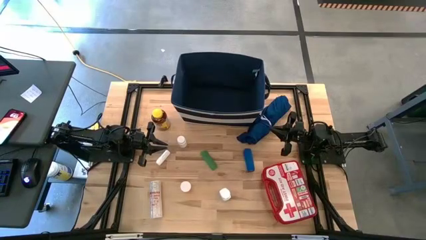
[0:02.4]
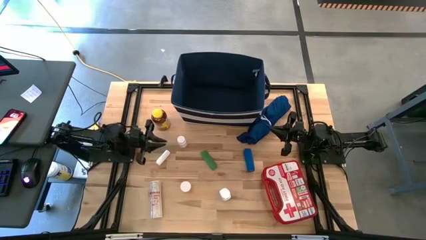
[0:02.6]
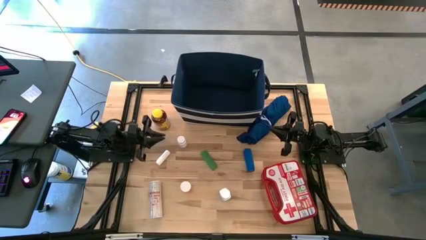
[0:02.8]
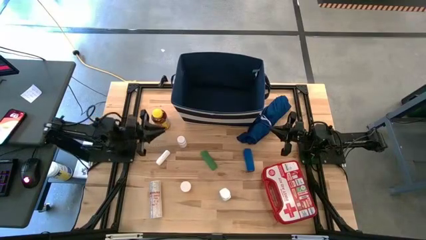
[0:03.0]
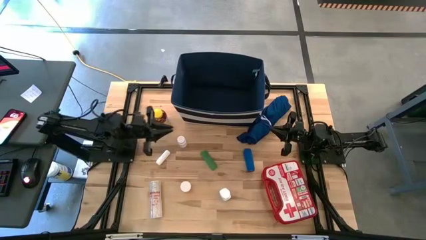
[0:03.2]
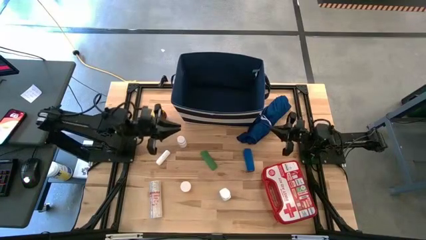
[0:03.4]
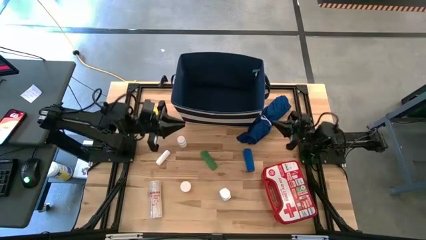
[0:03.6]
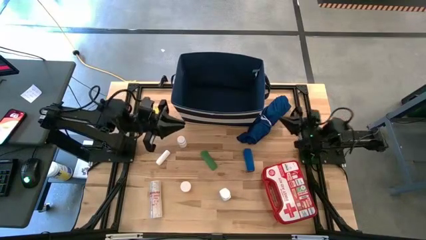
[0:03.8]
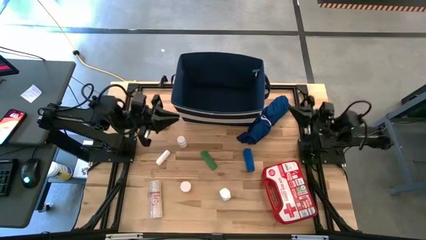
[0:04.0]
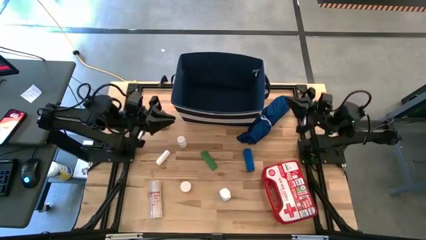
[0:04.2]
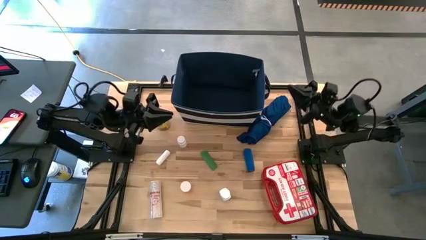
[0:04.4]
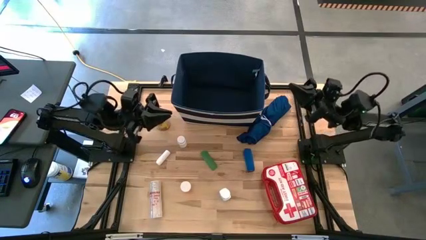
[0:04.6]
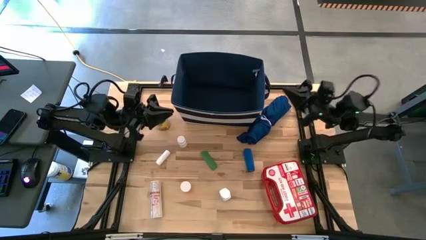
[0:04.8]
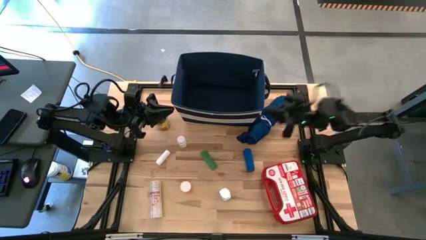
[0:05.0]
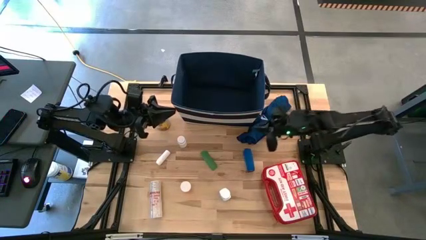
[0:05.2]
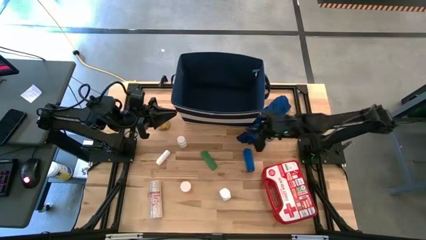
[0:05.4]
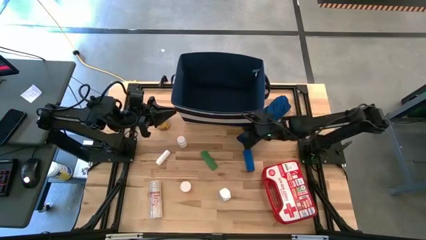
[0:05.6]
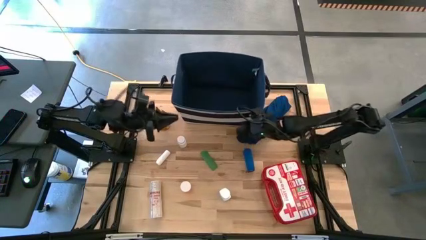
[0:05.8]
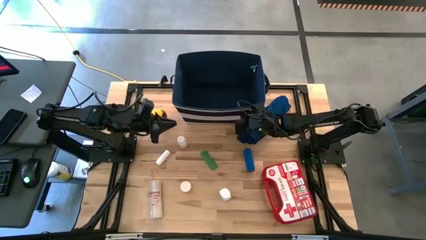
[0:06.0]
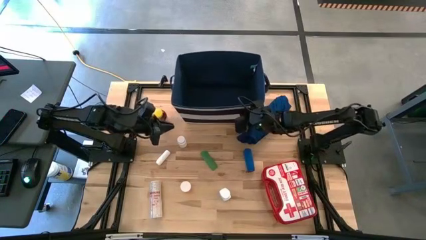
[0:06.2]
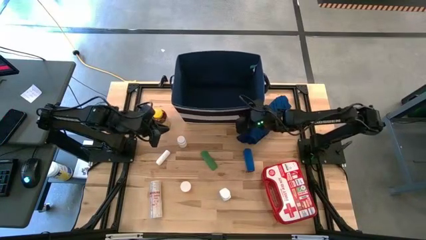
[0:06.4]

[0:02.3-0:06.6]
Task: Pick & place medical supplies in basket/bin
Adjust the blue bin

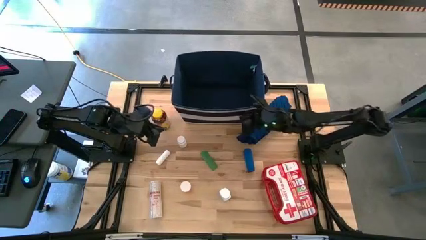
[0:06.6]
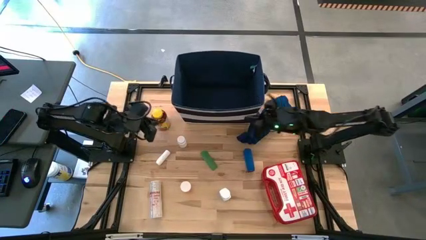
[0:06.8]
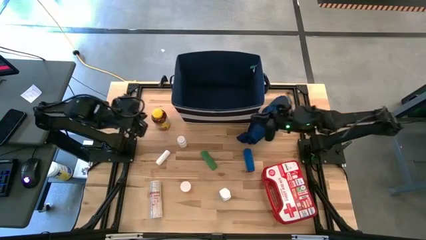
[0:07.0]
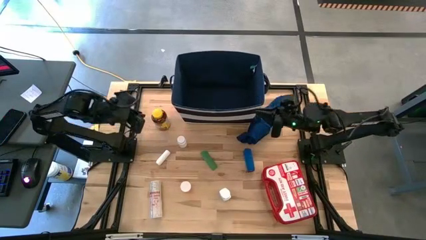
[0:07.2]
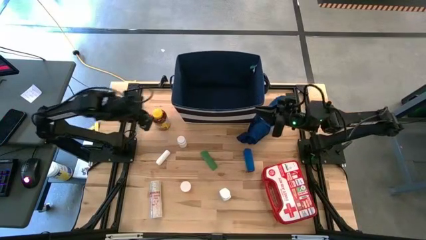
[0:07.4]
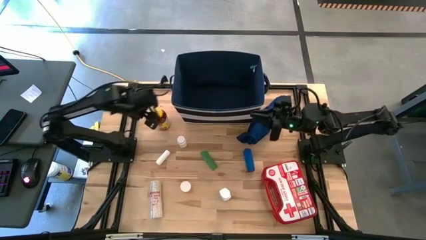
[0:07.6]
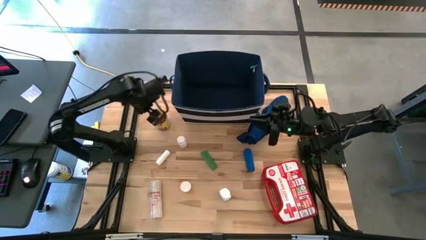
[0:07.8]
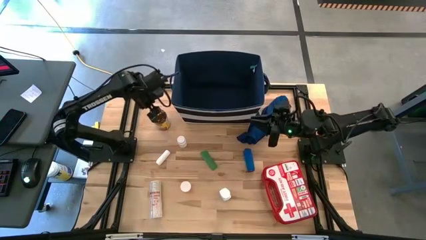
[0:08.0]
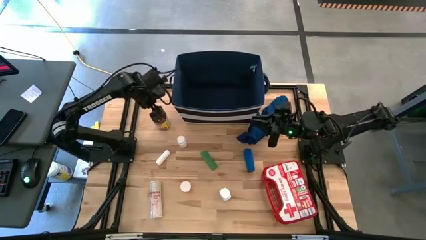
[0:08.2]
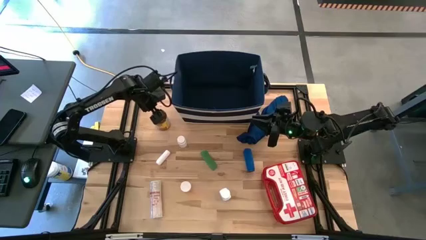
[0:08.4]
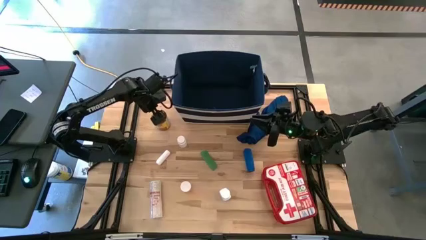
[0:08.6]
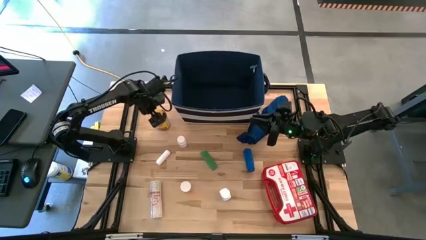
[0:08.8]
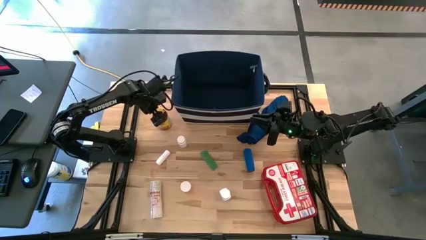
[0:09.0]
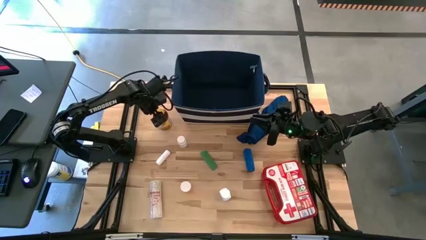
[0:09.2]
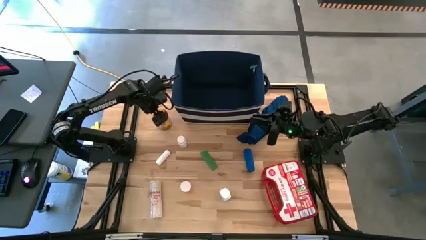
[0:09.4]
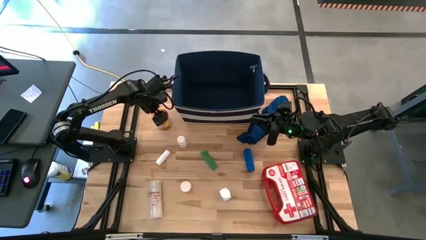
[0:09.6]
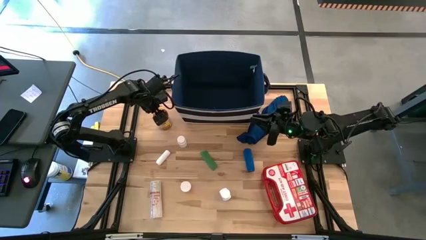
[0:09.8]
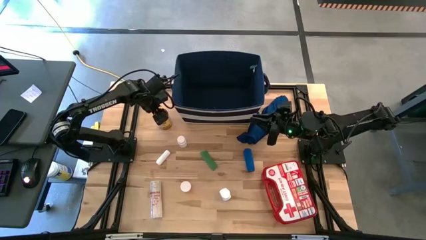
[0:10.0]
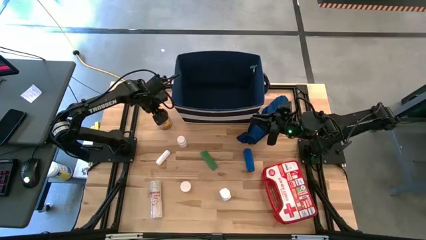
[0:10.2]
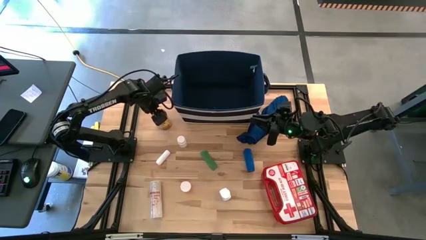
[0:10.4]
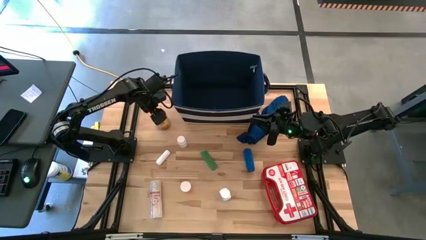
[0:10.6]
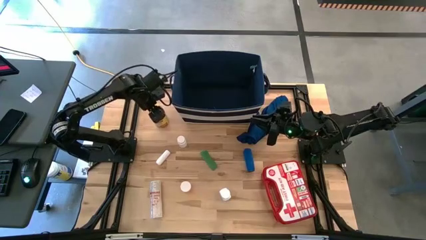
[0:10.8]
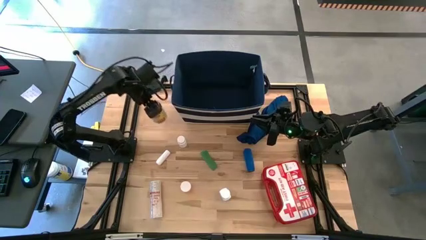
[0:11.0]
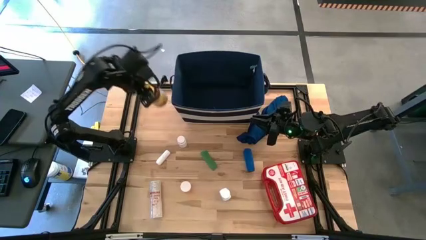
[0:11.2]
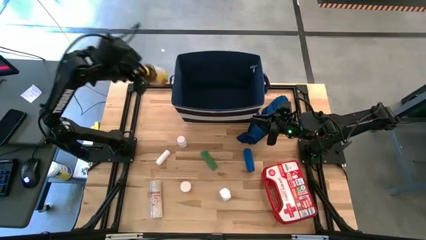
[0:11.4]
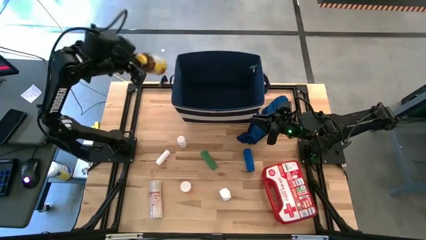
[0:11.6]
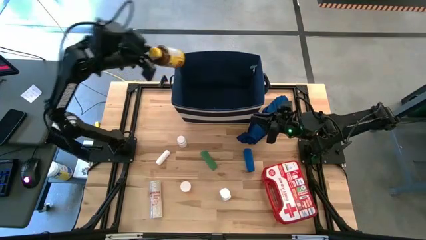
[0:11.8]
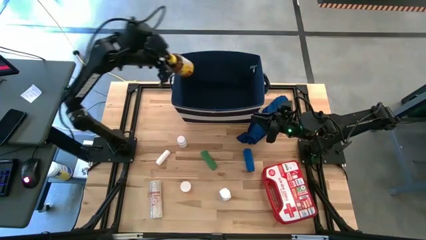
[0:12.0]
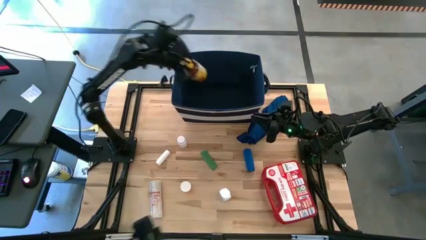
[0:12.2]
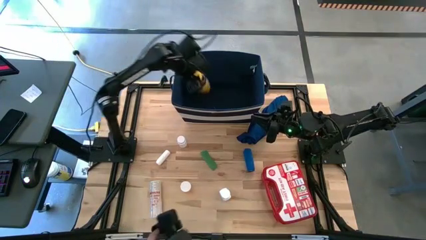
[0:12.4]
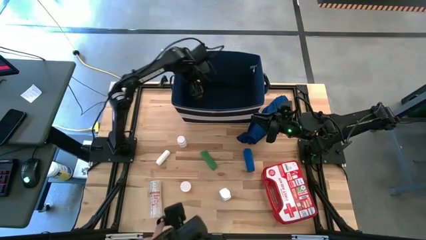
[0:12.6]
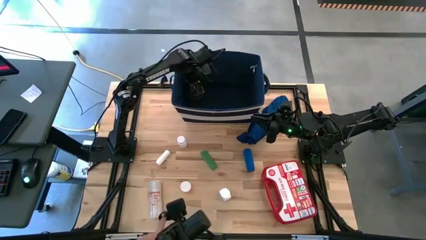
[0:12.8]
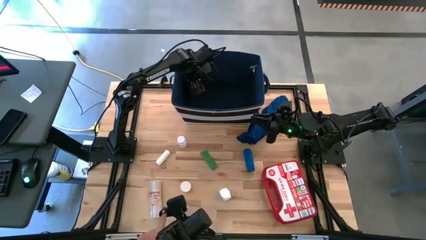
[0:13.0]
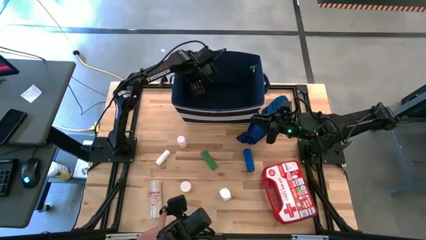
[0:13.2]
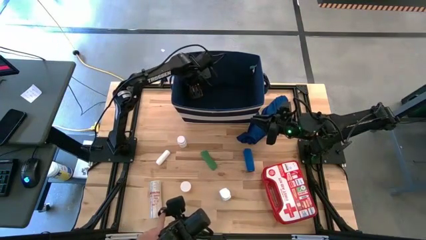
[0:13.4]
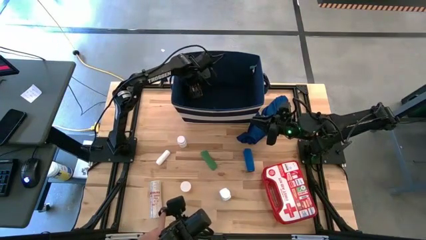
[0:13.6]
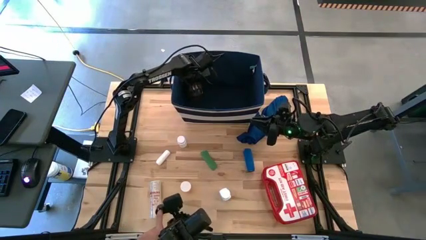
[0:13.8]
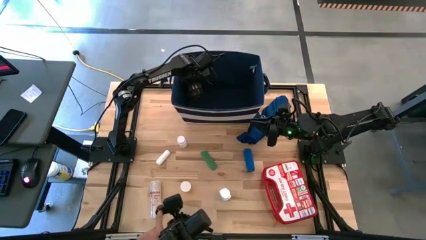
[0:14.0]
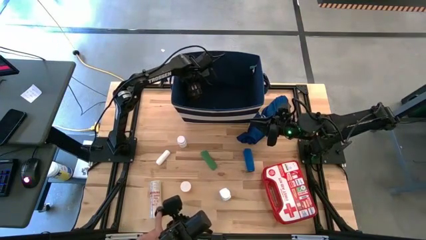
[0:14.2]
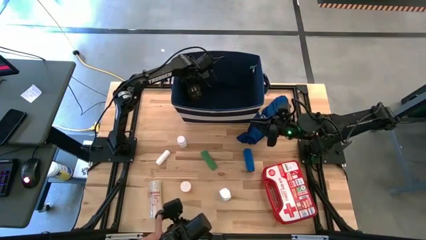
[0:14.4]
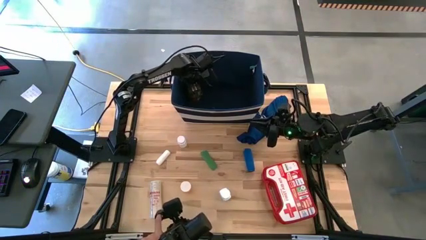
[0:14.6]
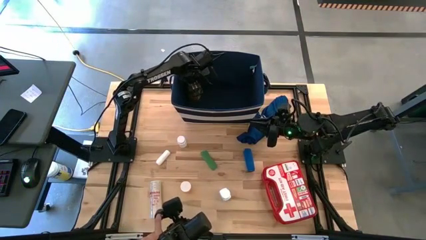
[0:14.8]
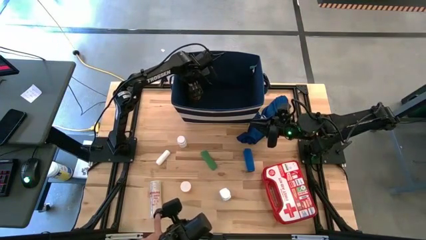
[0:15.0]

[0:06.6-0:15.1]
Put the yellow medicine bottle into the blue bin

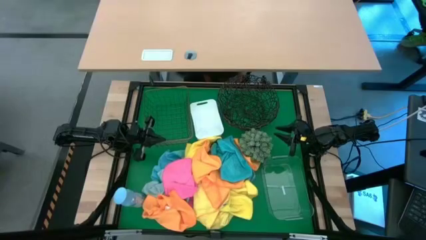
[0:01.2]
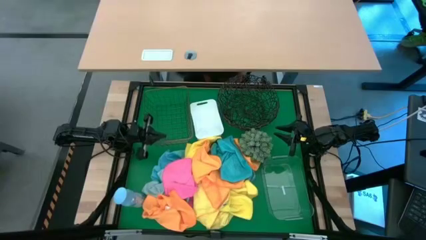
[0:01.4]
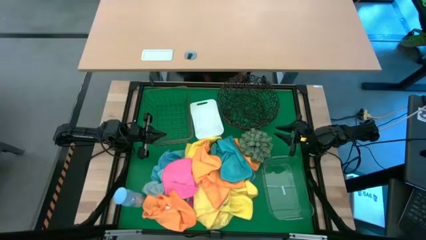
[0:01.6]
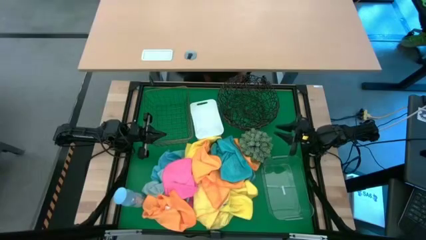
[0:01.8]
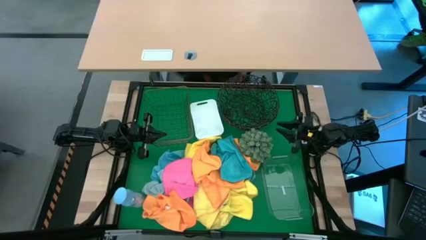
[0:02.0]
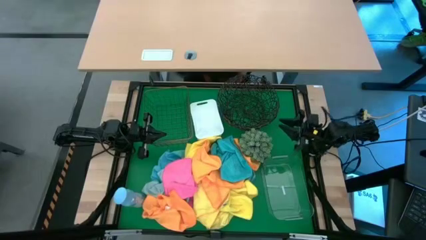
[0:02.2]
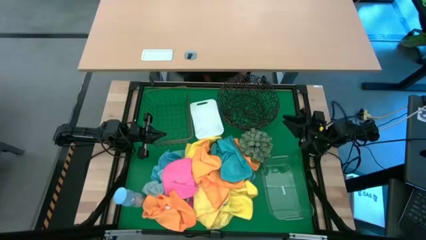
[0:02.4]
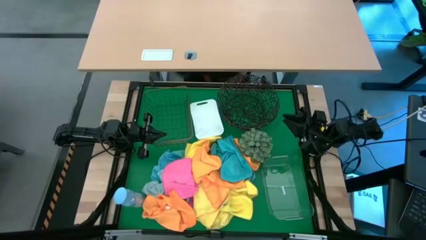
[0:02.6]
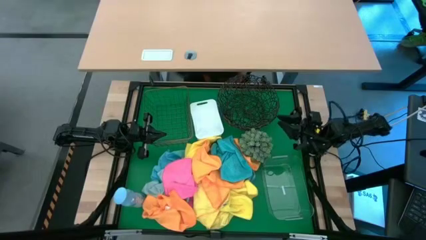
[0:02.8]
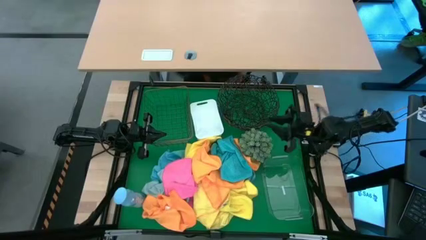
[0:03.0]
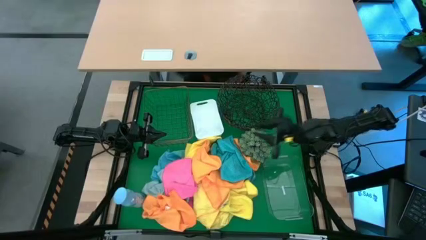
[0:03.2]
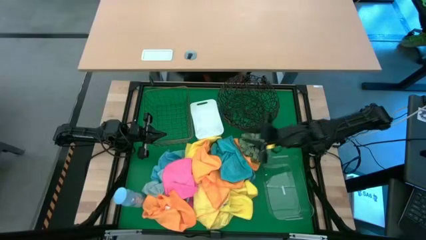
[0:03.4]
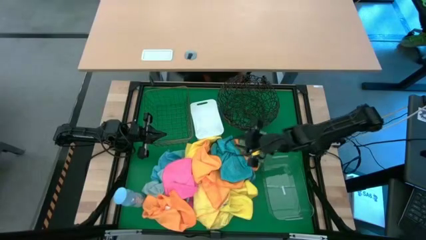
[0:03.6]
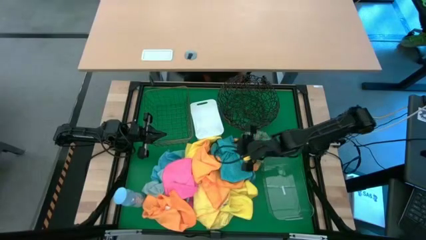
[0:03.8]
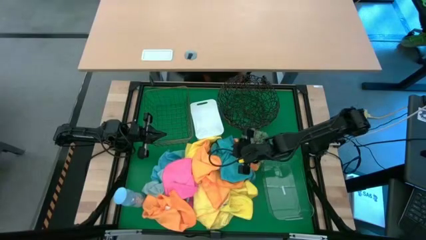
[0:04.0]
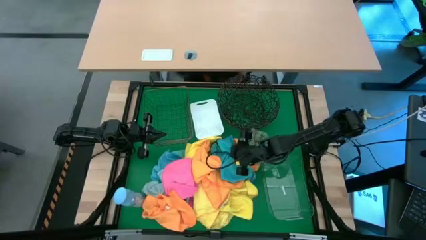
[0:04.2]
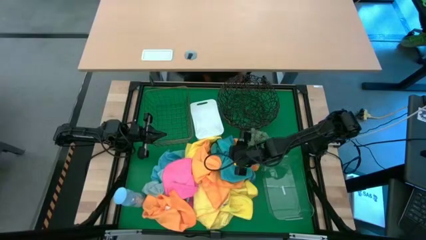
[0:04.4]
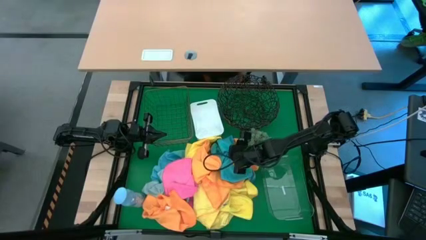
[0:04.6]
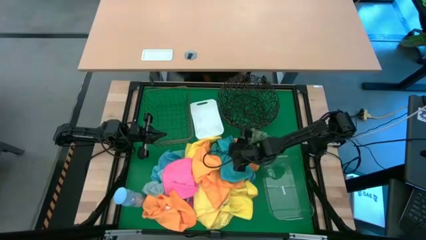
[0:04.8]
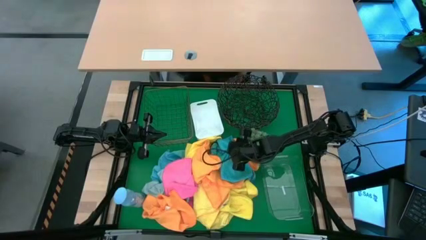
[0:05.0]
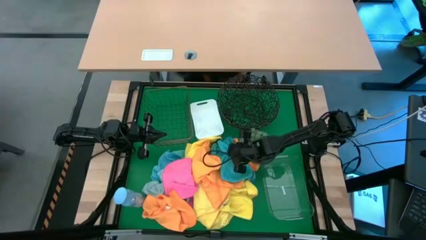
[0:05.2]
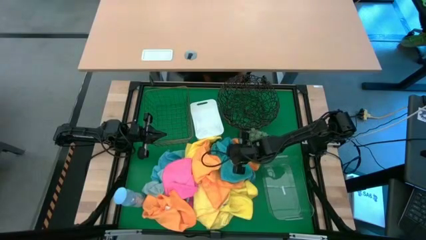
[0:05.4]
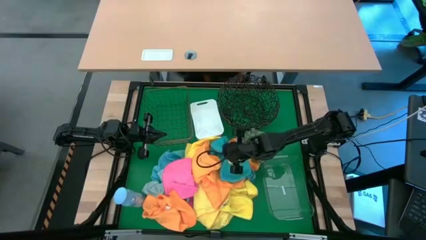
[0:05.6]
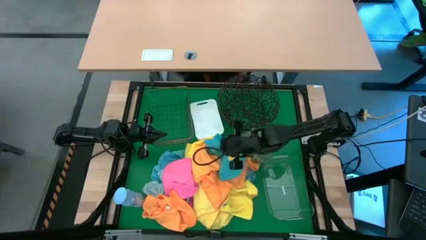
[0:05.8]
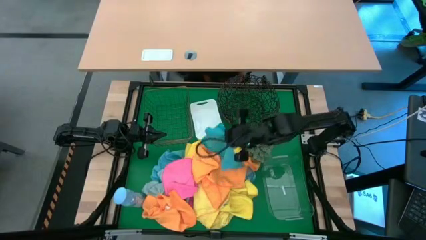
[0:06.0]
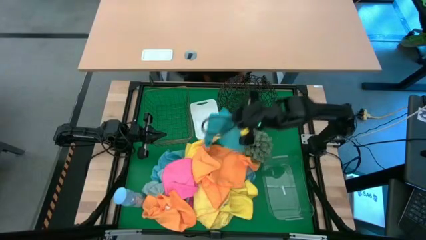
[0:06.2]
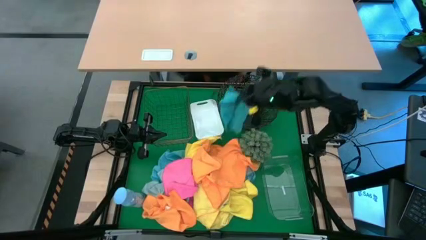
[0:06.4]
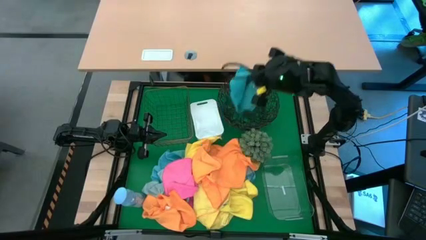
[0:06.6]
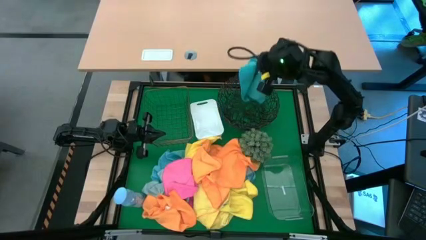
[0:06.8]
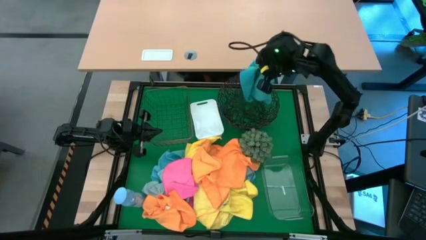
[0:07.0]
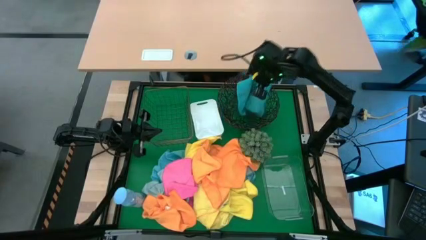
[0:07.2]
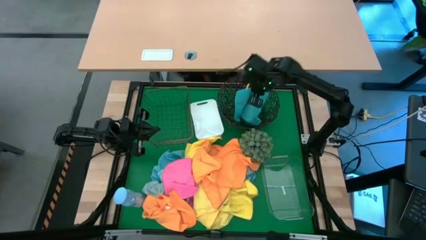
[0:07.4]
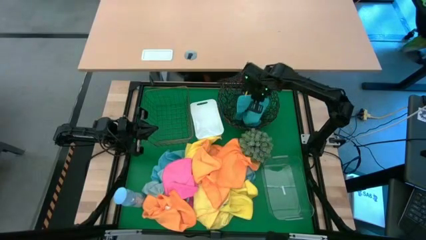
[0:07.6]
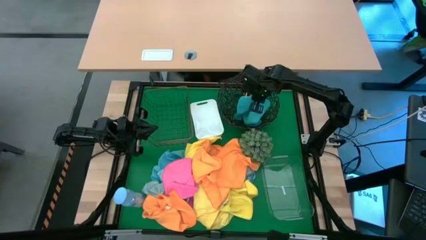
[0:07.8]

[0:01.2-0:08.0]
Task: Sort microfiber towel by color & place in baskets
Put the blue microfiber towel into the black basket
